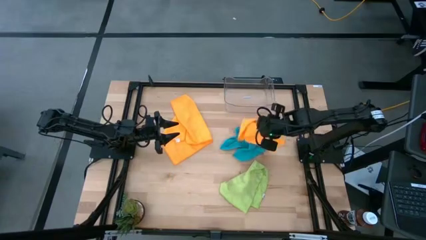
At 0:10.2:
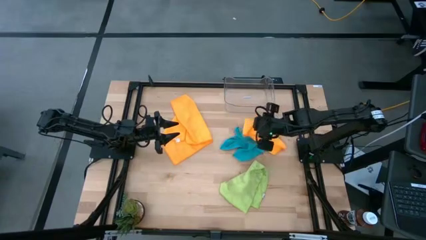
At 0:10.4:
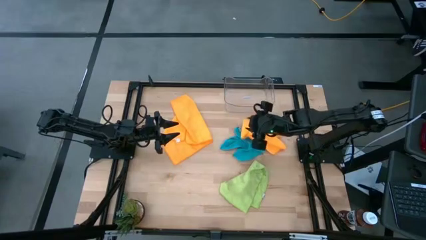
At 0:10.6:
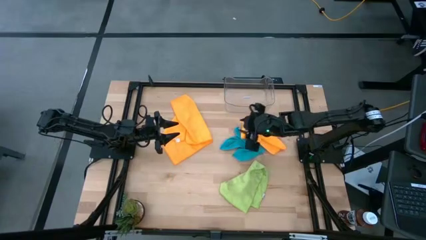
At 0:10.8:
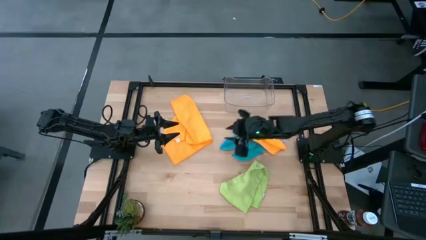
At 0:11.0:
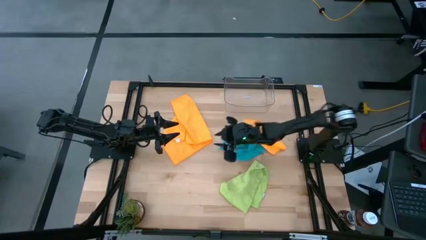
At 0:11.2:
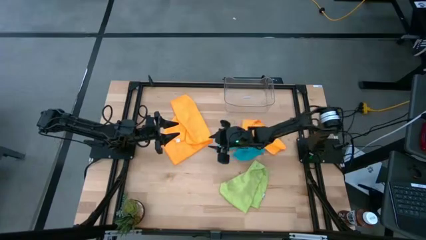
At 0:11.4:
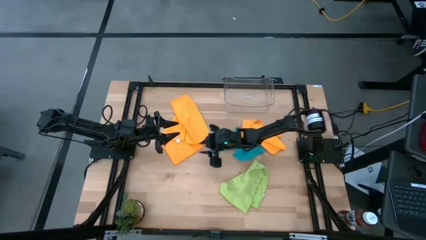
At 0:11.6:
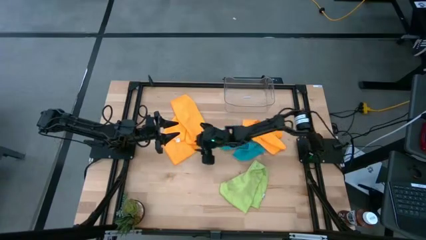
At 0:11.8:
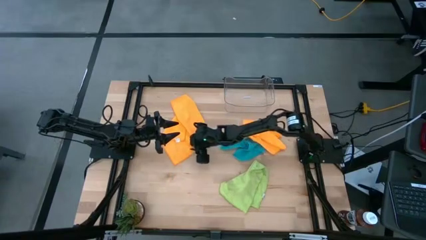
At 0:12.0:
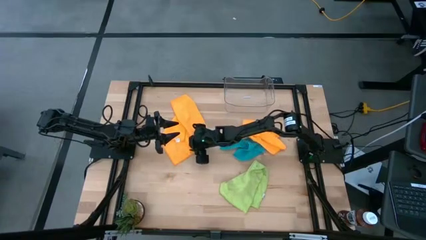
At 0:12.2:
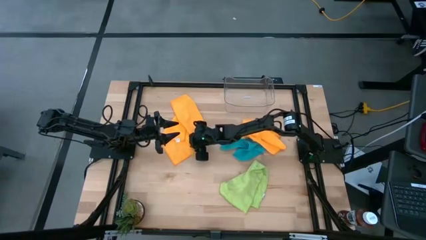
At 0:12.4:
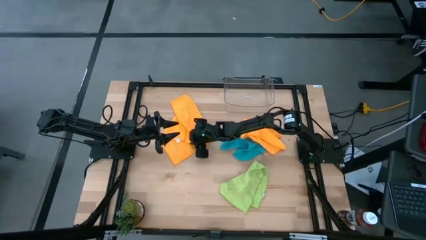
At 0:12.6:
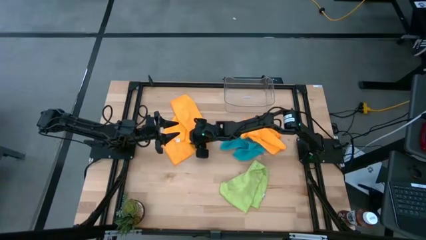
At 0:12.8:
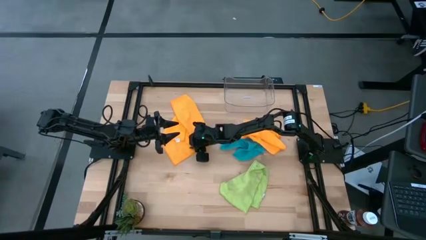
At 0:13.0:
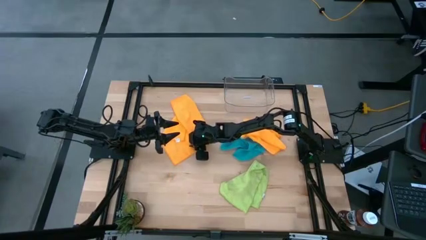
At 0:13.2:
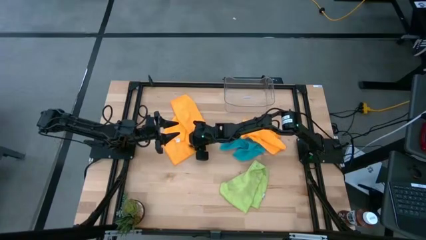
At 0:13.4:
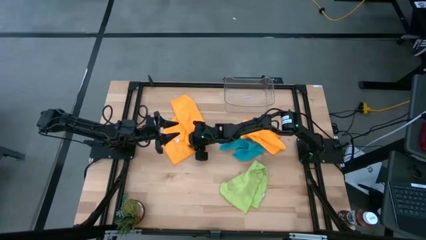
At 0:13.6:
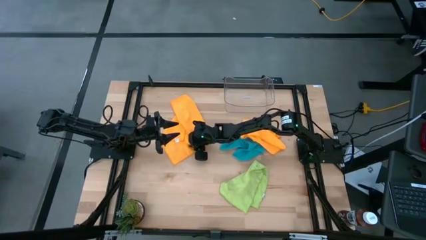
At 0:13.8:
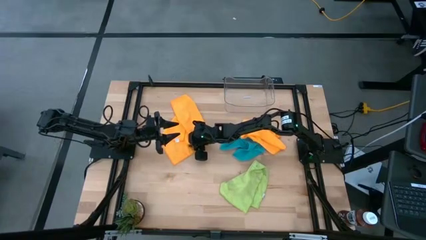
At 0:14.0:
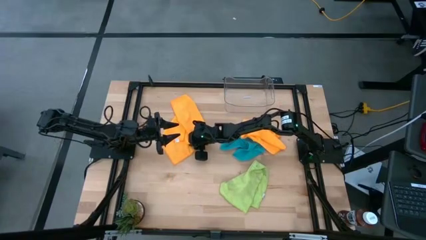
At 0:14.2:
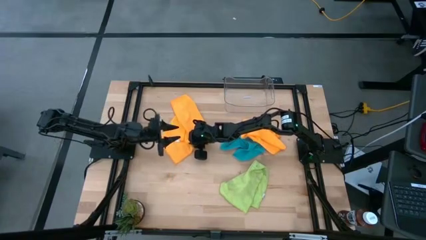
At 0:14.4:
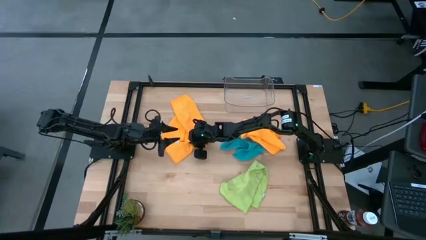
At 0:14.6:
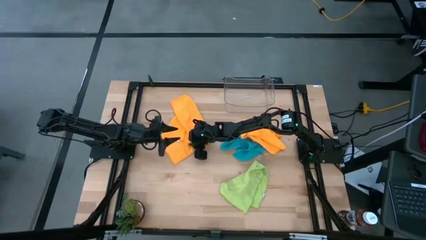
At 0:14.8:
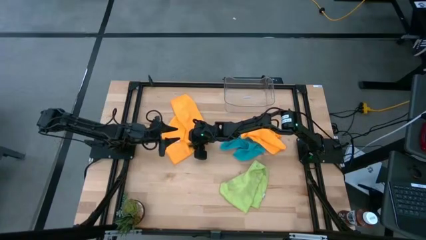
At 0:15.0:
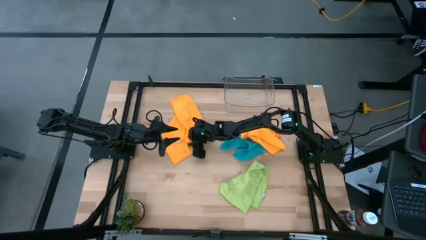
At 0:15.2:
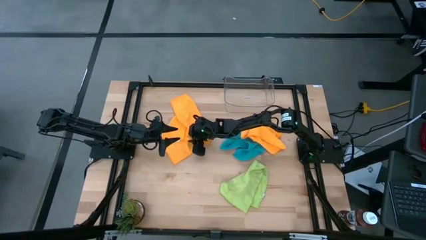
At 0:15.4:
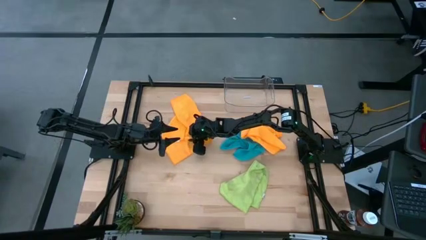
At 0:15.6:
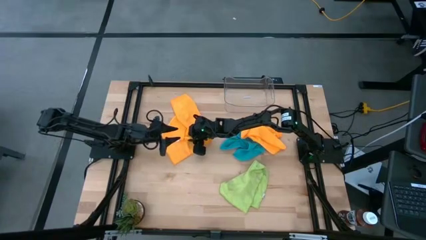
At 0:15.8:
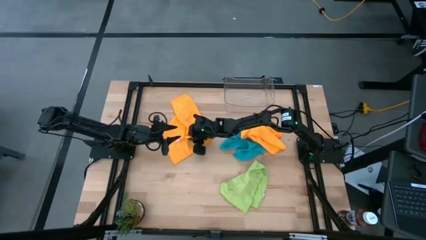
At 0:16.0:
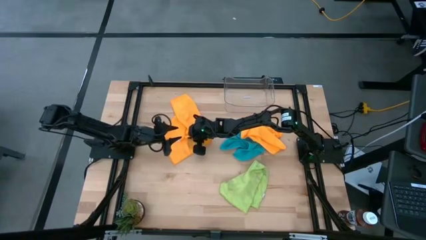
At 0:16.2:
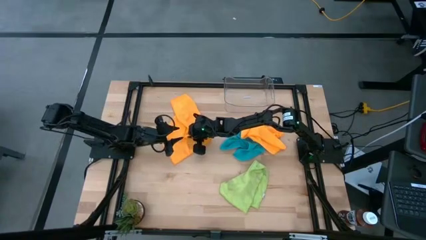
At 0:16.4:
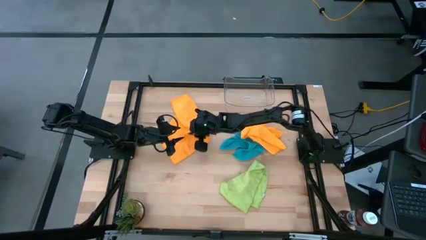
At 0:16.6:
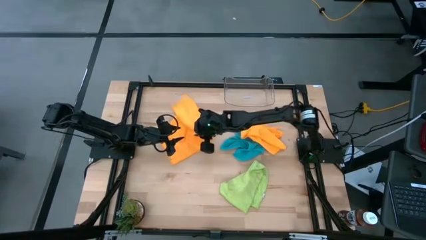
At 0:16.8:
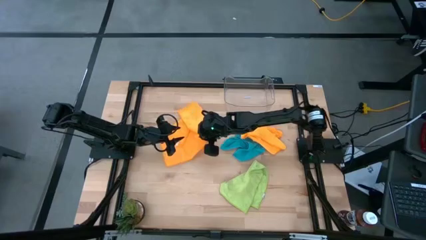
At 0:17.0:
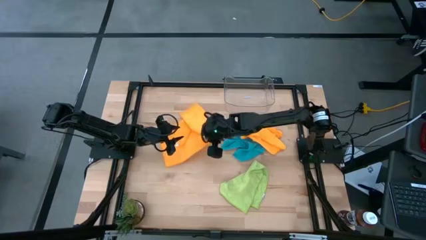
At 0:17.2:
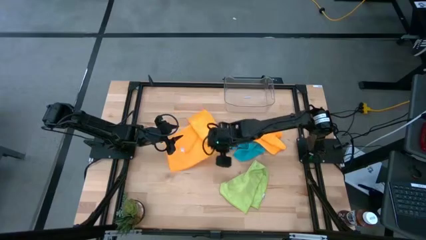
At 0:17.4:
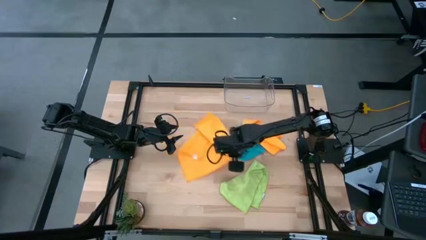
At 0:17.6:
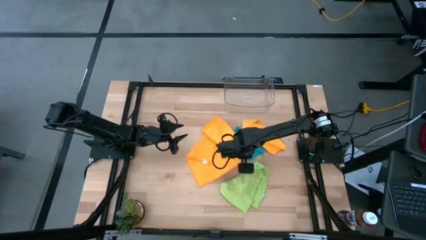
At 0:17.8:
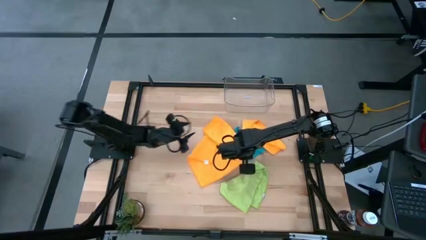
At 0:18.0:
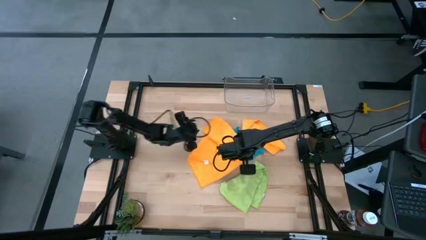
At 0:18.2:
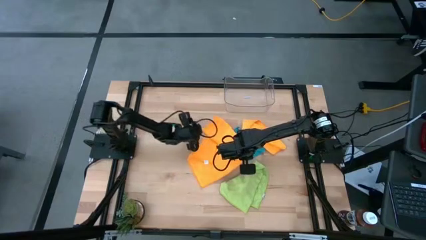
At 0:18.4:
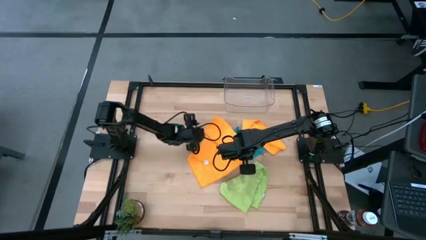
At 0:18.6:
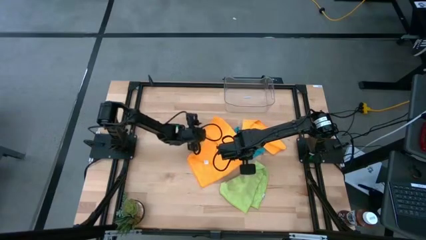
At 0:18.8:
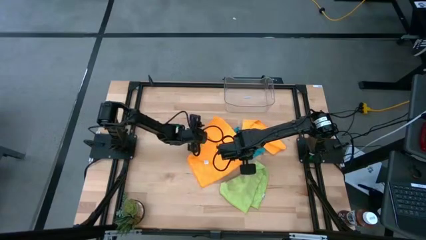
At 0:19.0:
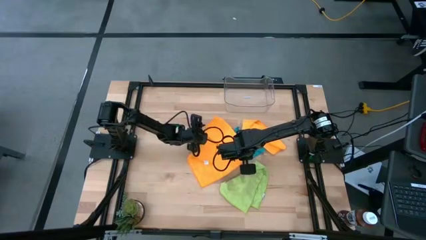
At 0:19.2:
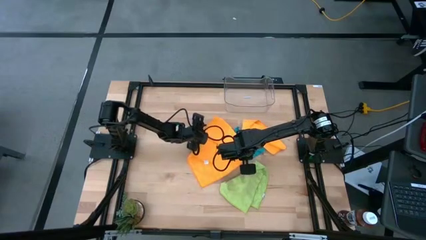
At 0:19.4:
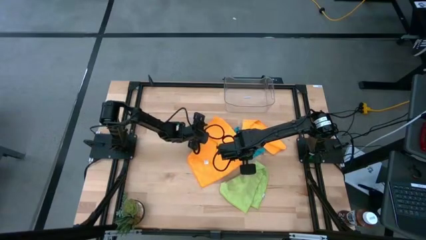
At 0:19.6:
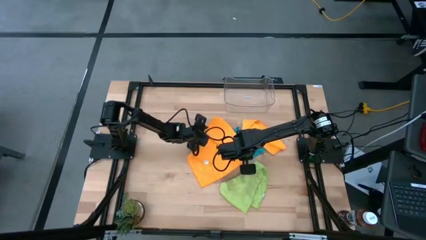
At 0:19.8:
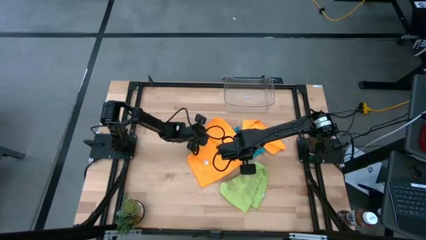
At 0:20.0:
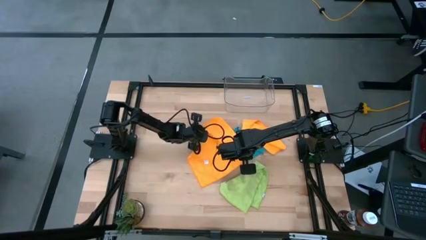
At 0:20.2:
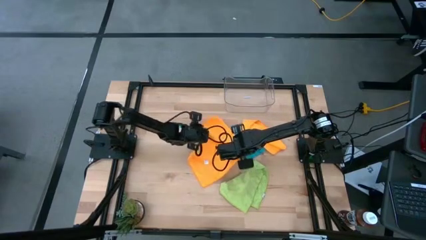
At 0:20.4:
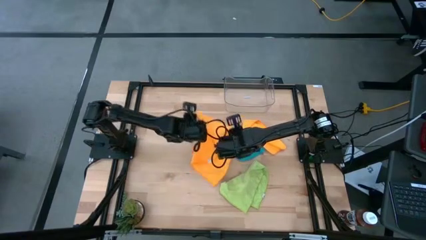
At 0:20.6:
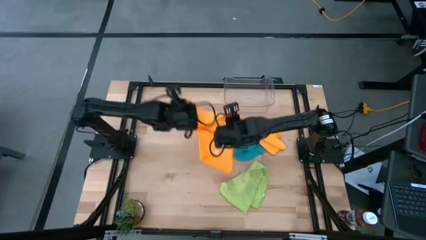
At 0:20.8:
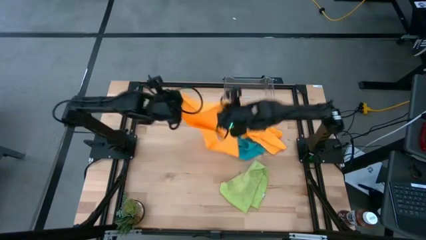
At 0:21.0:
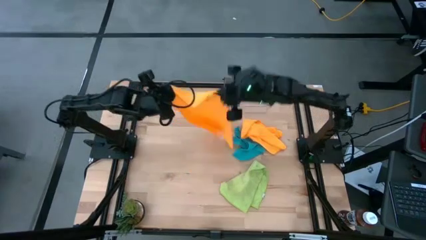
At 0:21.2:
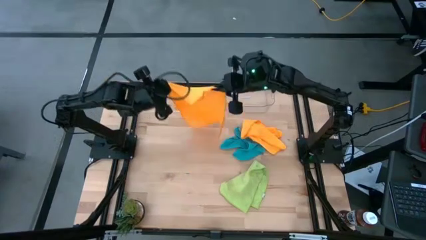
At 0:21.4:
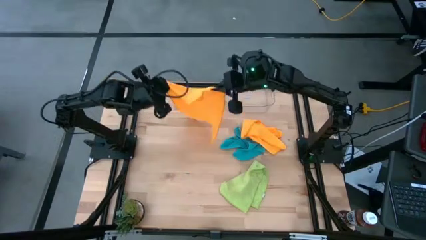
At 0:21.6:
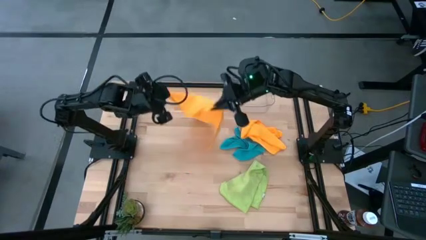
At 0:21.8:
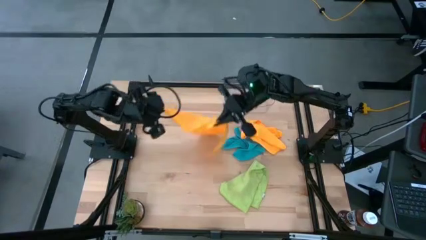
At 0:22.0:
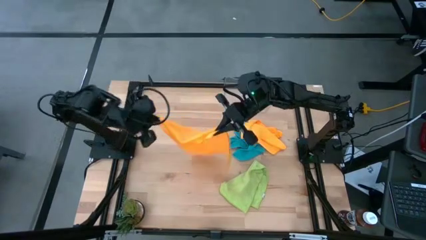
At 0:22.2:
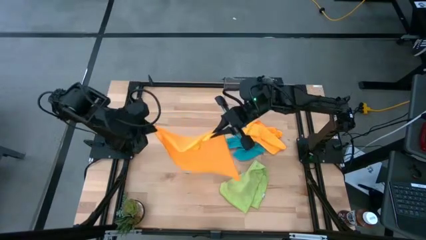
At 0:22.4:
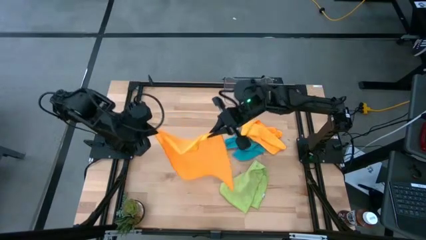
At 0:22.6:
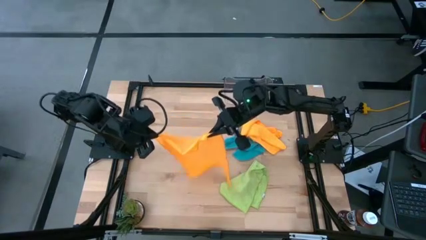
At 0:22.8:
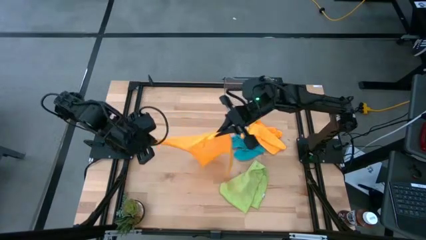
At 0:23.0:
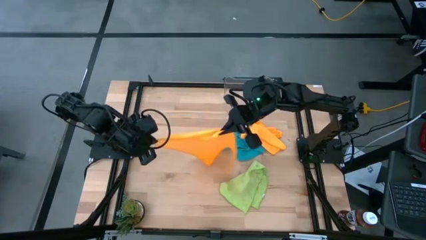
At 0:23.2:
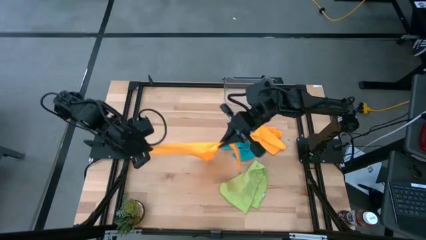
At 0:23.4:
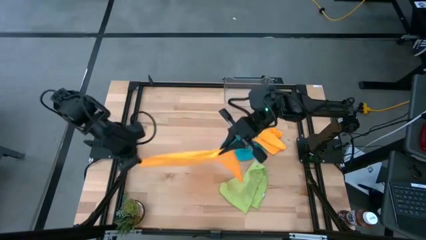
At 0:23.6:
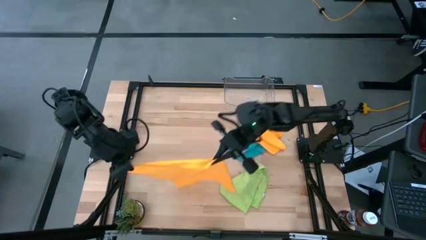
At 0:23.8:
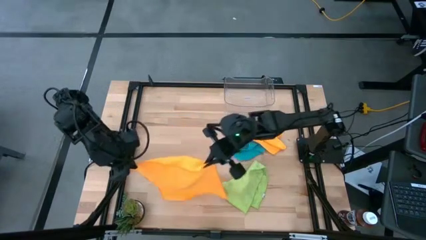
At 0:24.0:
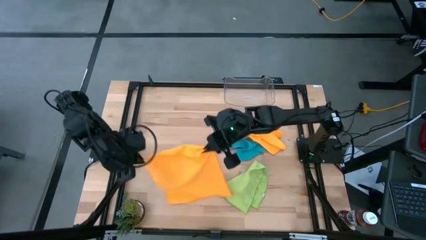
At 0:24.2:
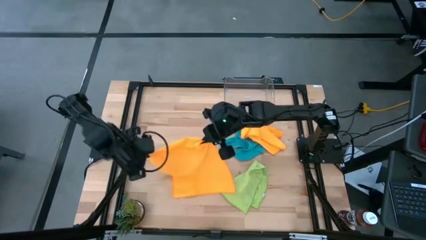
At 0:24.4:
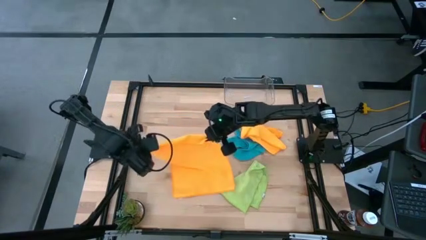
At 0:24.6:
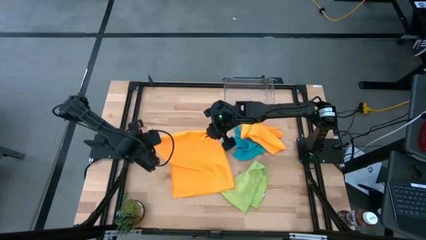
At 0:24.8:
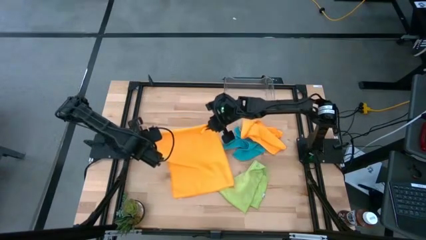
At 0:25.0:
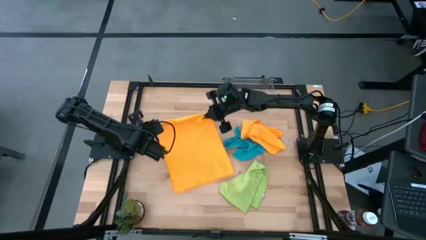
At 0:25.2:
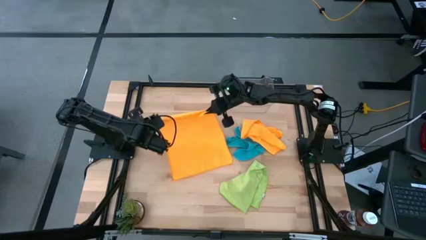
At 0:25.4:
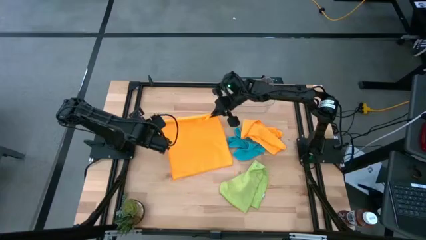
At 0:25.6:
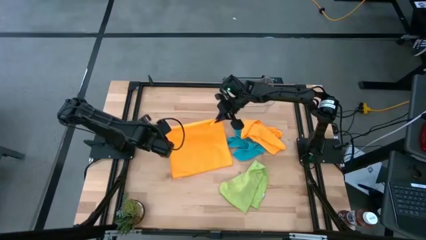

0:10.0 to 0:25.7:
Task: Fold microfiber towels
Fold the left yellow microfiber cloth
